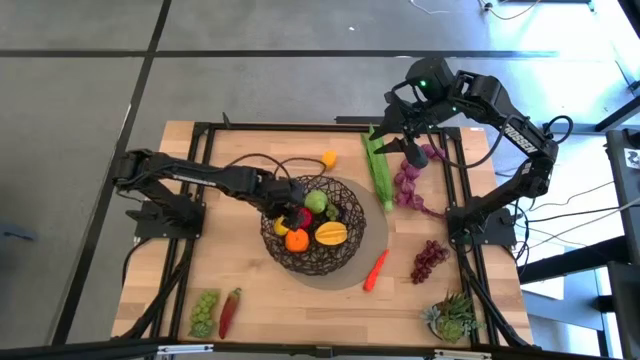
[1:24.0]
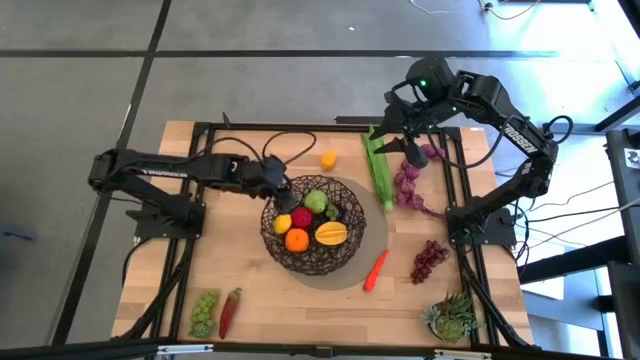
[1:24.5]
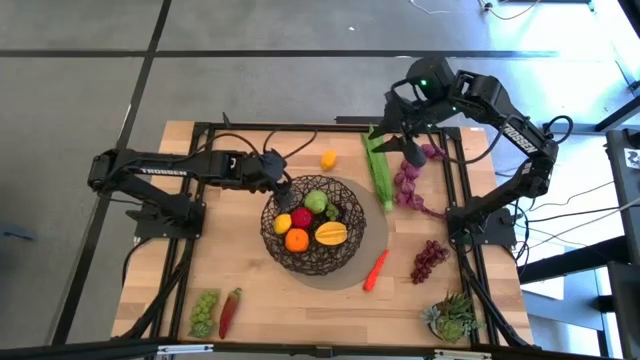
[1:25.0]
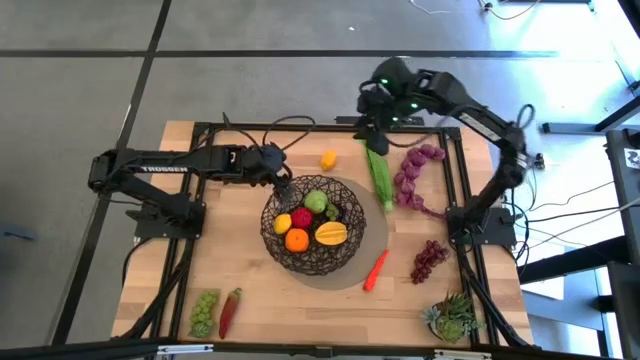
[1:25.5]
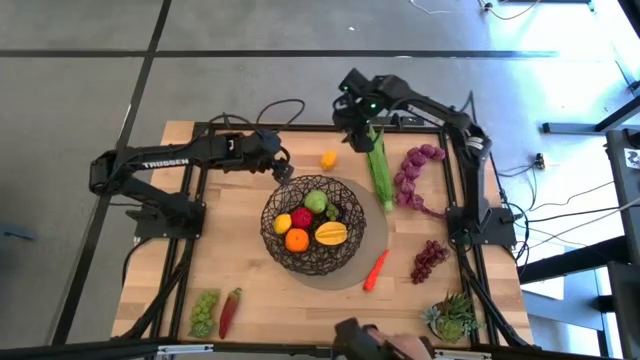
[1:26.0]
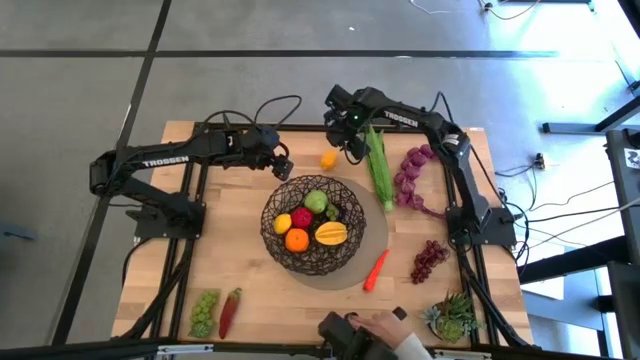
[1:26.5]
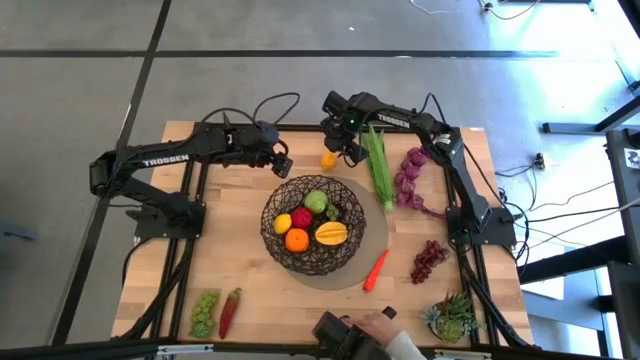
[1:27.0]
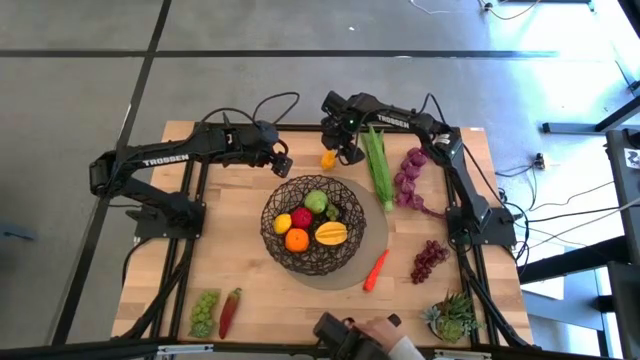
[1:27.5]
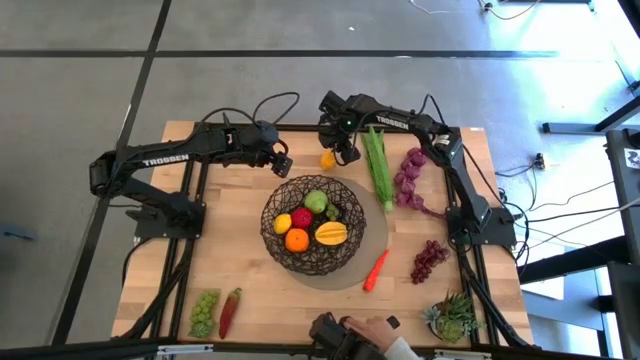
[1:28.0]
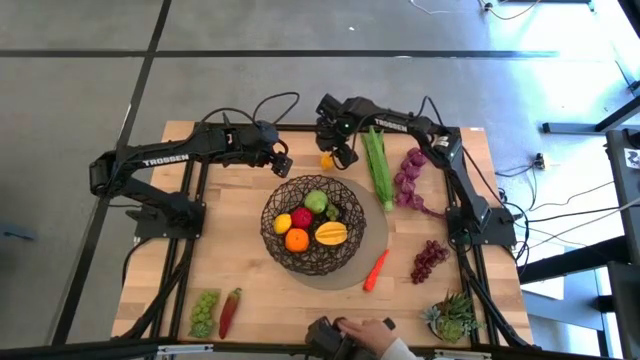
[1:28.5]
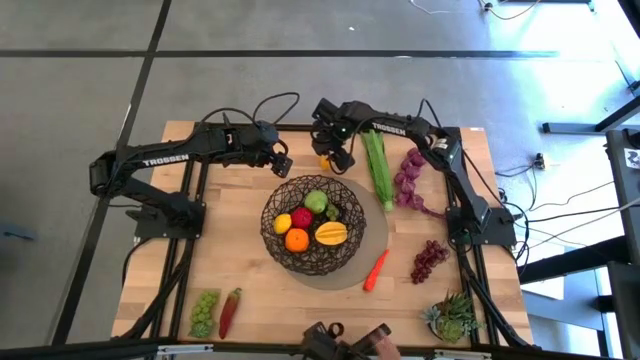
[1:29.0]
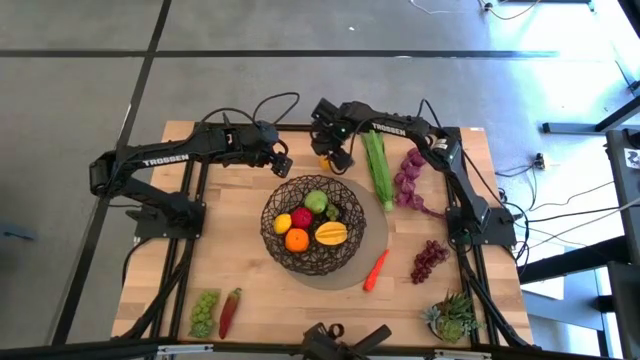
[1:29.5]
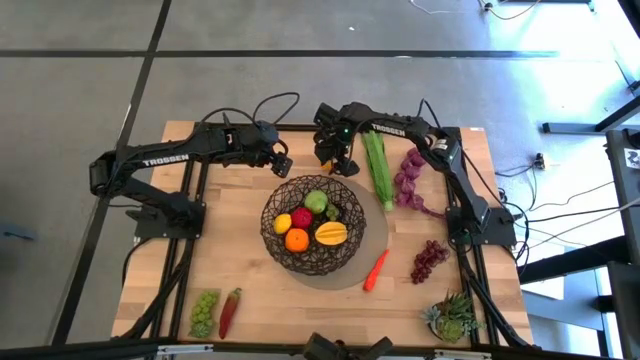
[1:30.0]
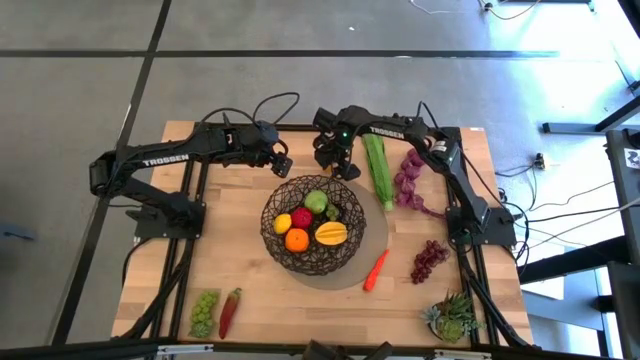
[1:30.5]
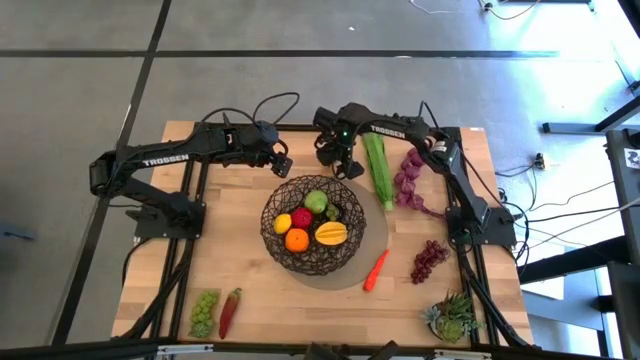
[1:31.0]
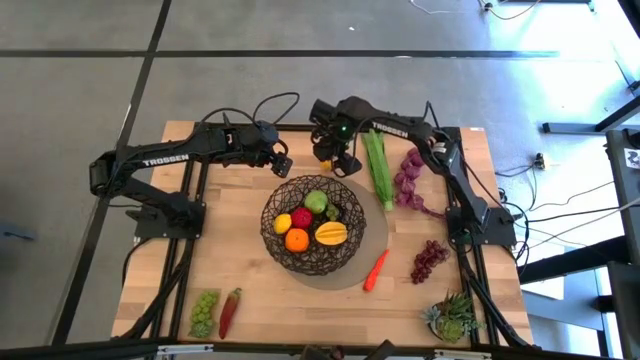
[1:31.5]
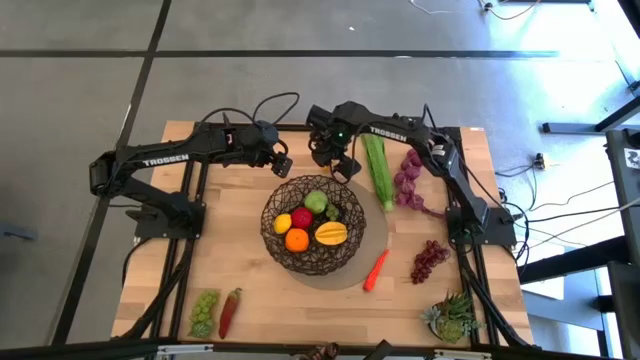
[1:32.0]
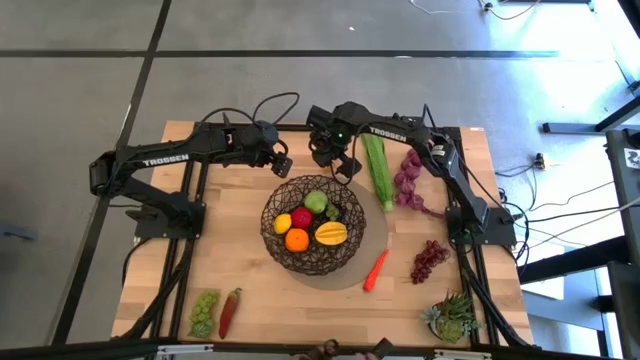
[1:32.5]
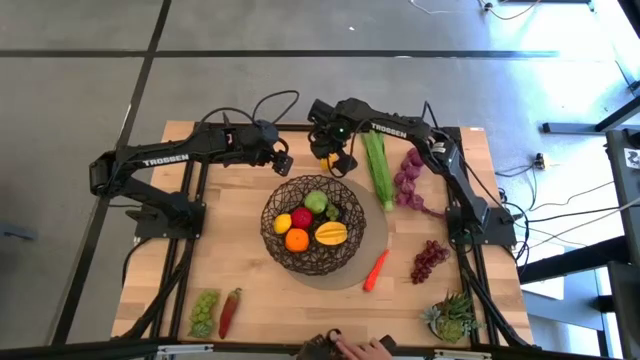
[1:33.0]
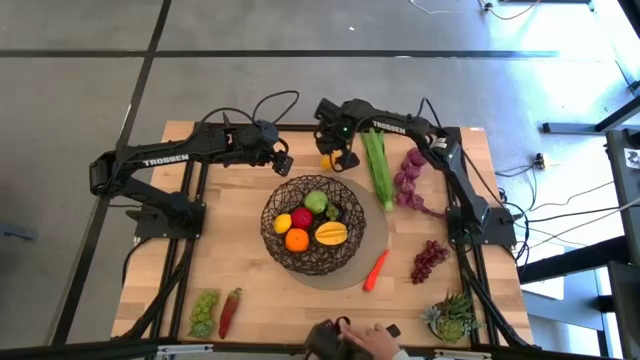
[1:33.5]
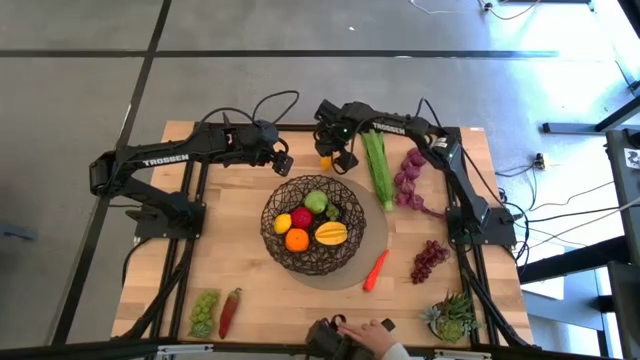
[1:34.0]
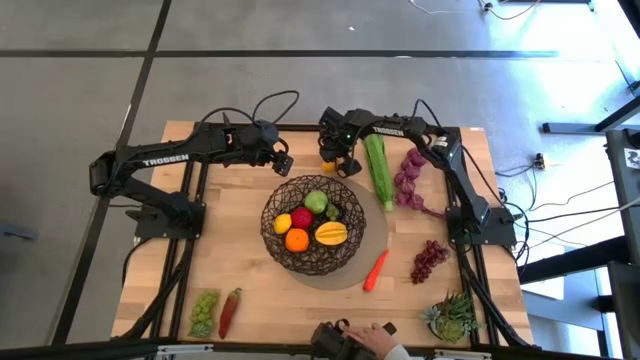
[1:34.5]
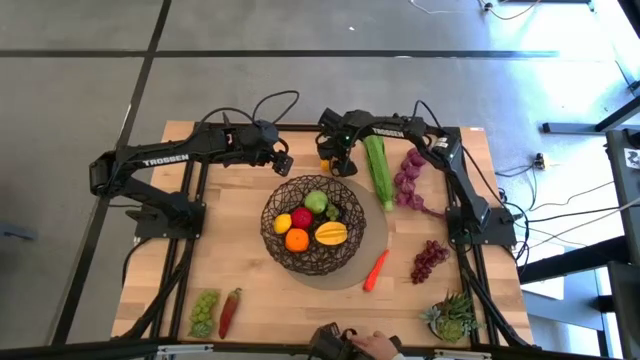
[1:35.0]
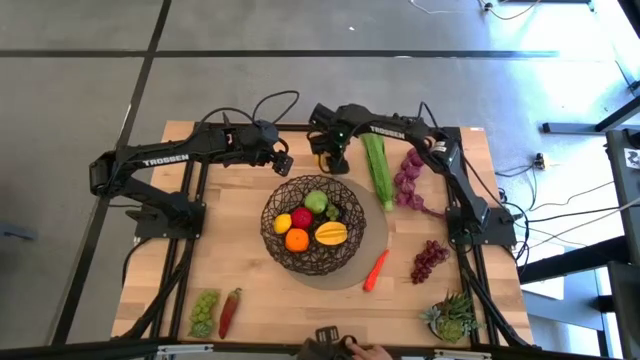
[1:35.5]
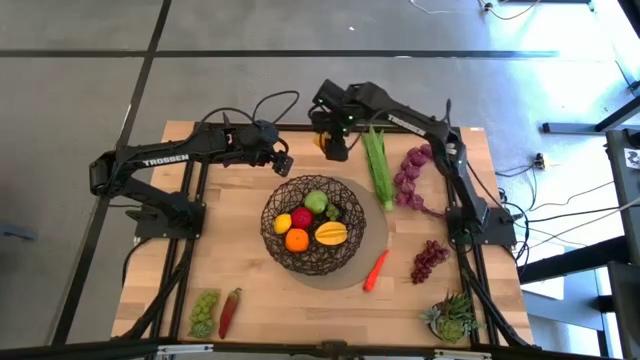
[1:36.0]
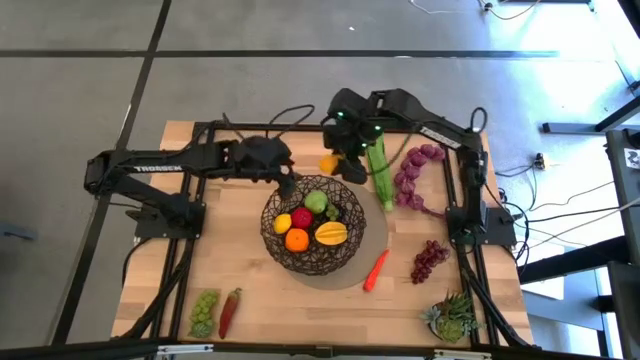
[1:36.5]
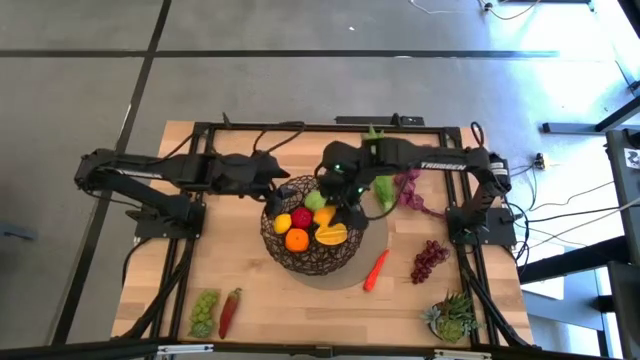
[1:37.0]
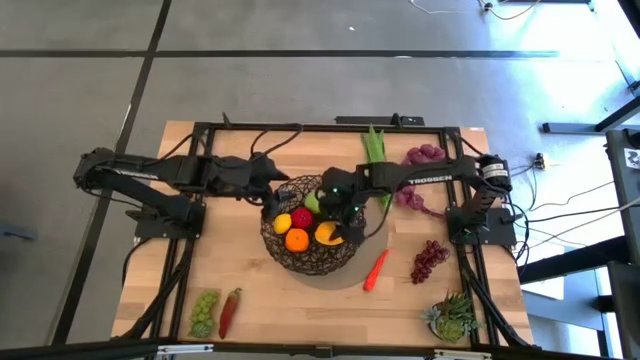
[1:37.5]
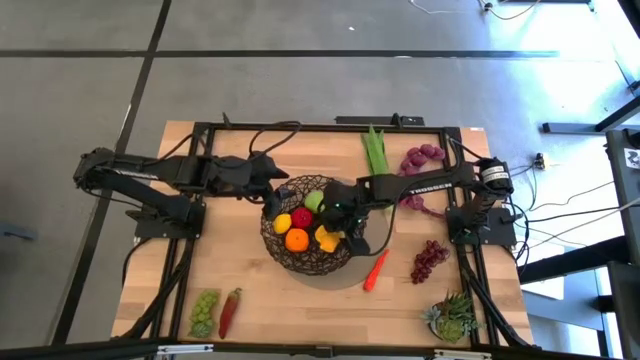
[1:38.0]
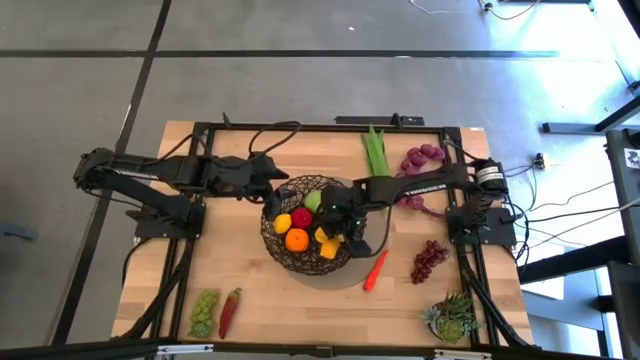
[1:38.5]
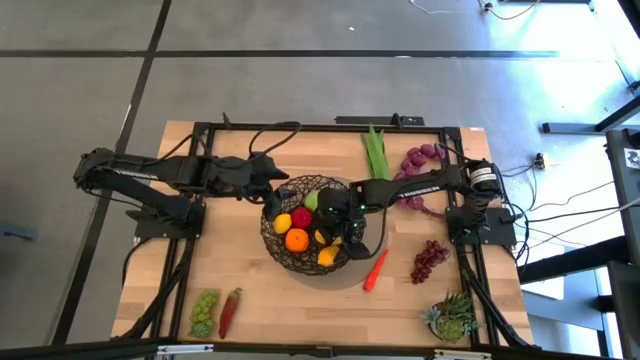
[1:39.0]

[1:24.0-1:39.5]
Task: Build produce basket
Put the lemon into the wire basket

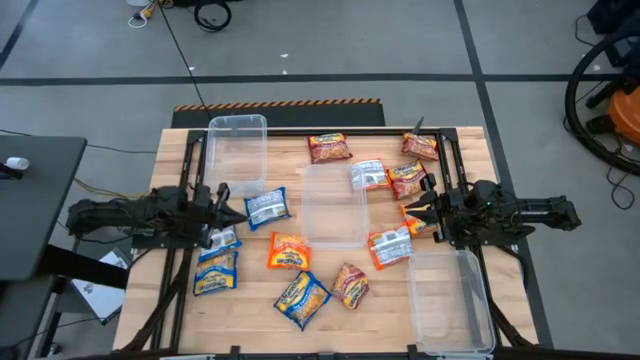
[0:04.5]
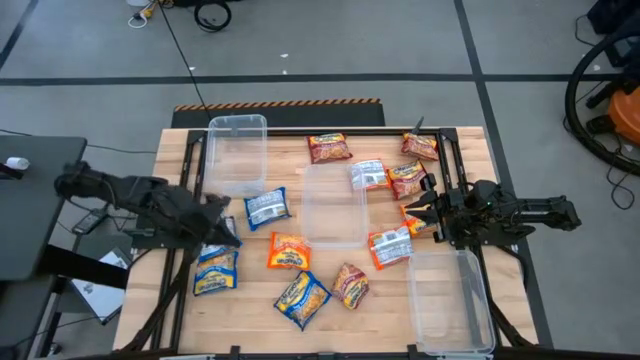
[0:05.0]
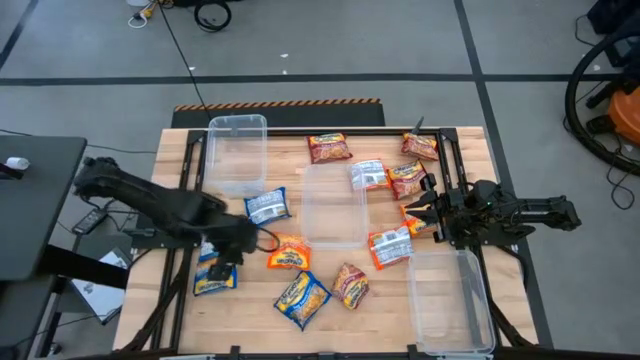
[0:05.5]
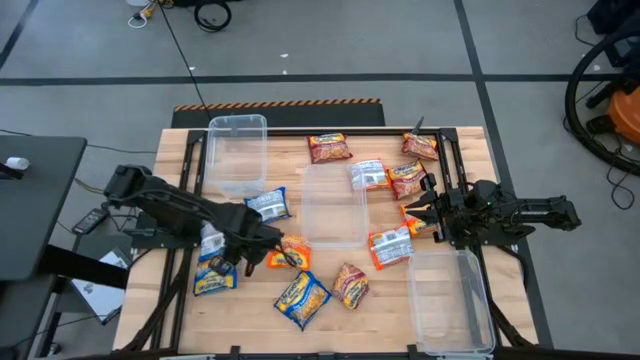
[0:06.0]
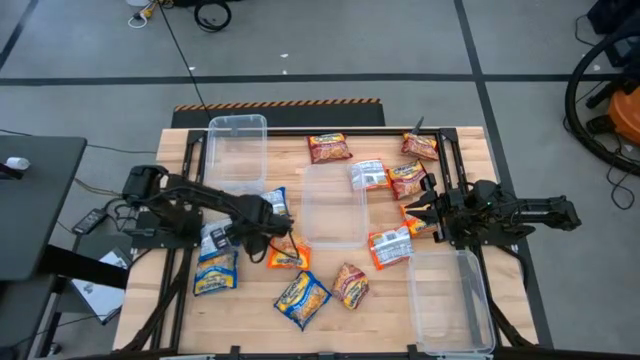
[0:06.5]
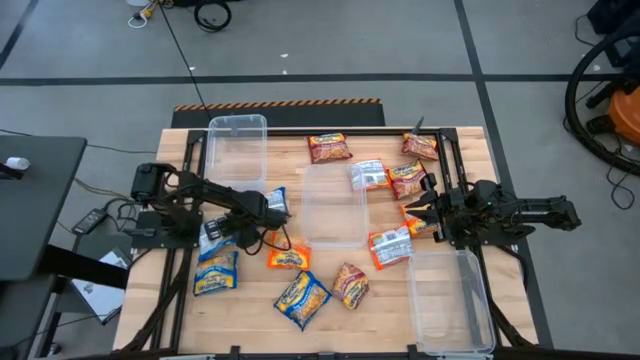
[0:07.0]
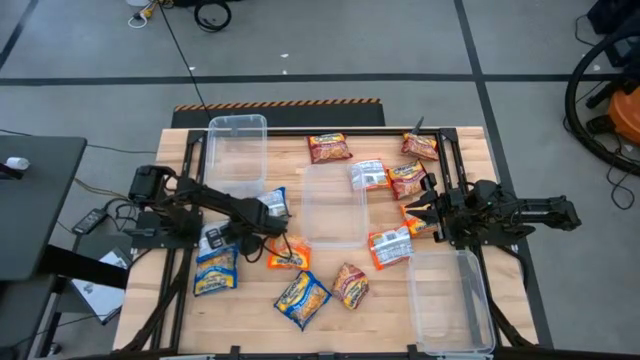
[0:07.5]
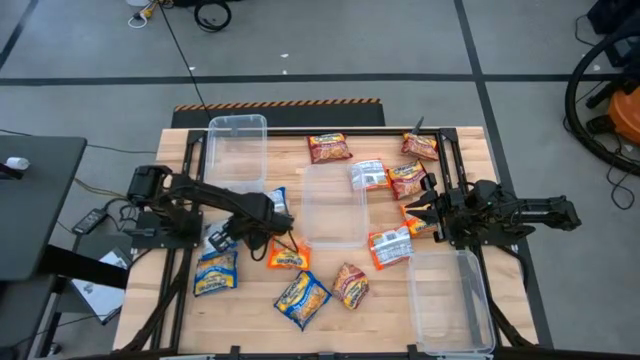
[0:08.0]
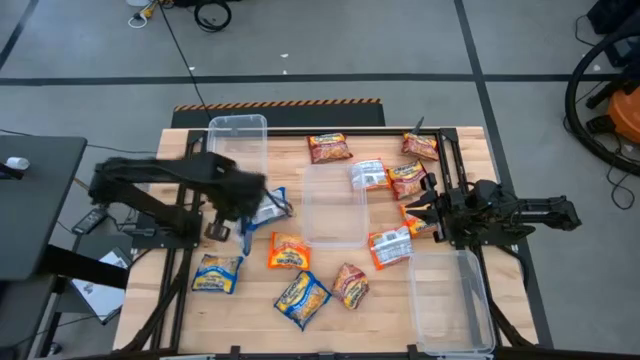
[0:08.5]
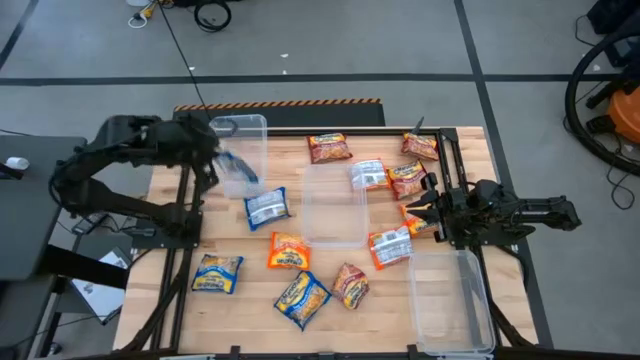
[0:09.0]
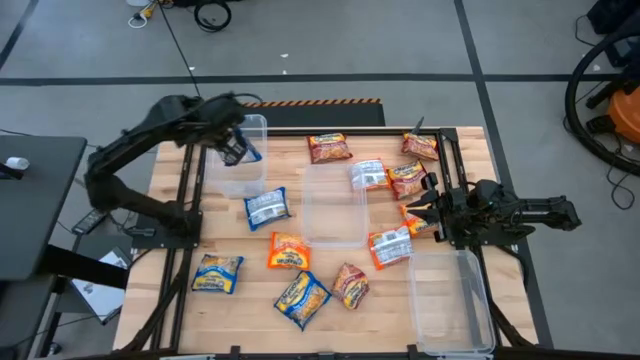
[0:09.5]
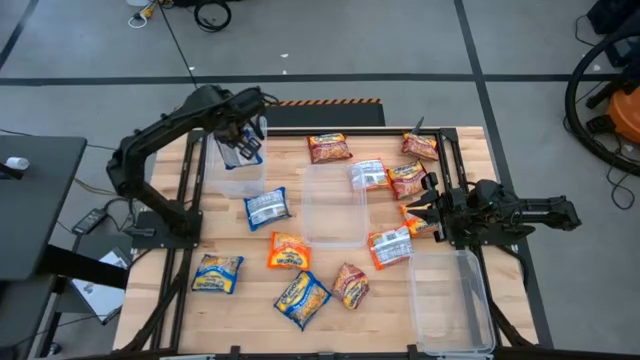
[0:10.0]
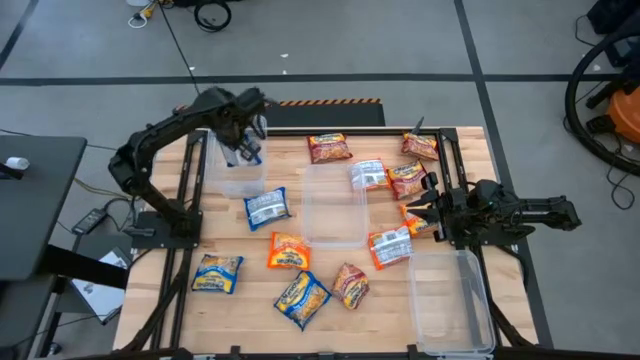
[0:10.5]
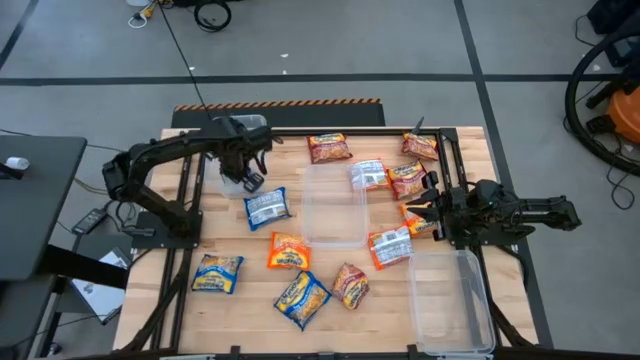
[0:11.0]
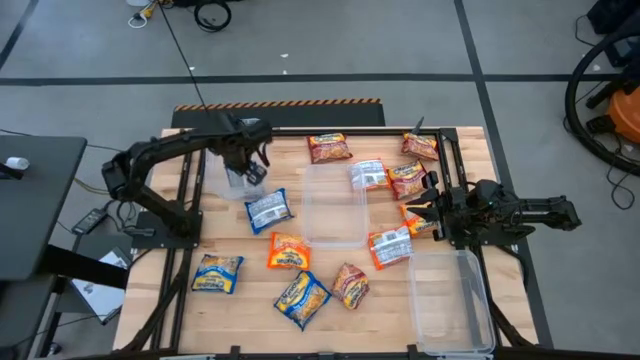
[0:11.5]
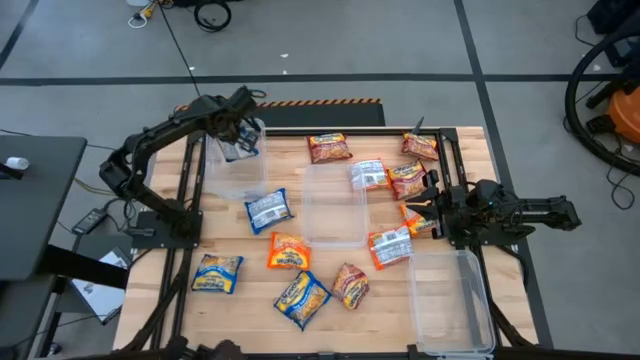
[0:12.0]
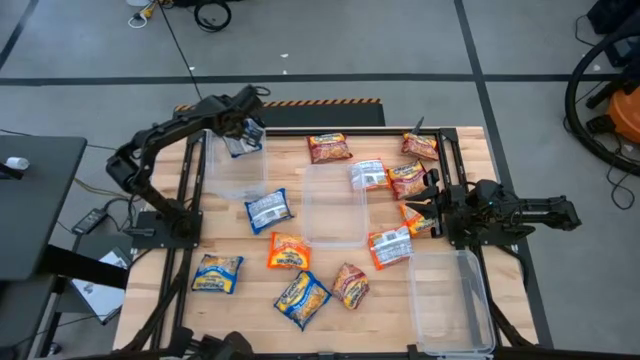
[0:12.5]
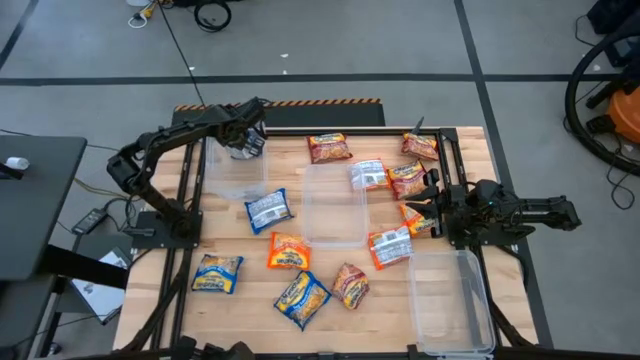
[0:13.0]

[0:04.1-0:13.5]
Task: Sort Maruchan noodles
Put the blue noodle pack into the top transparent bin
